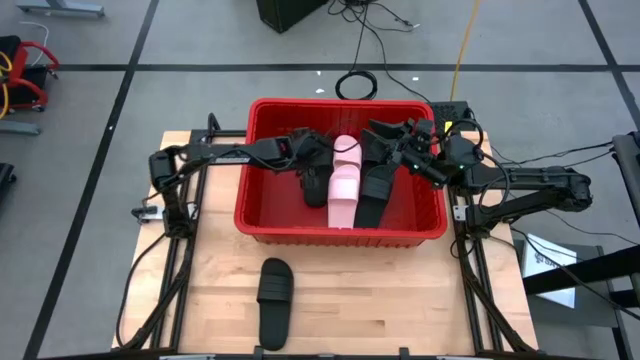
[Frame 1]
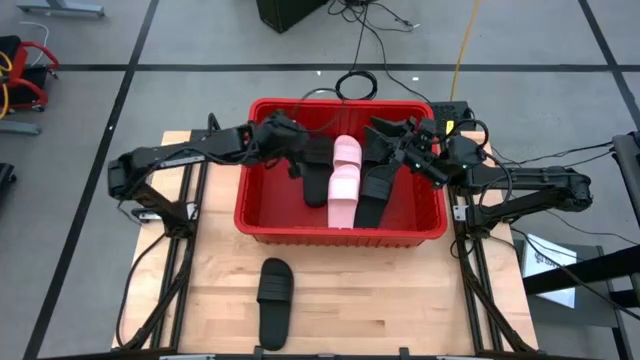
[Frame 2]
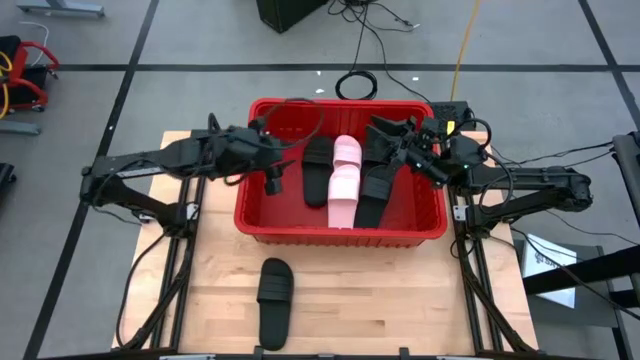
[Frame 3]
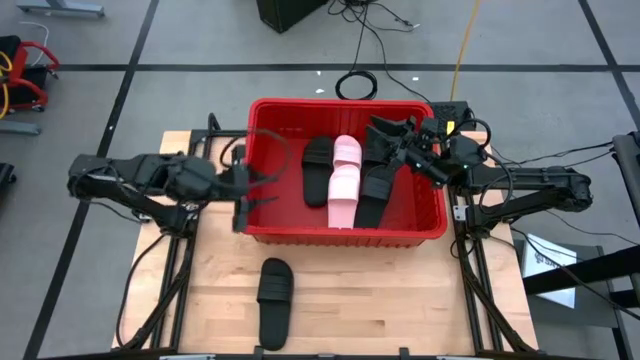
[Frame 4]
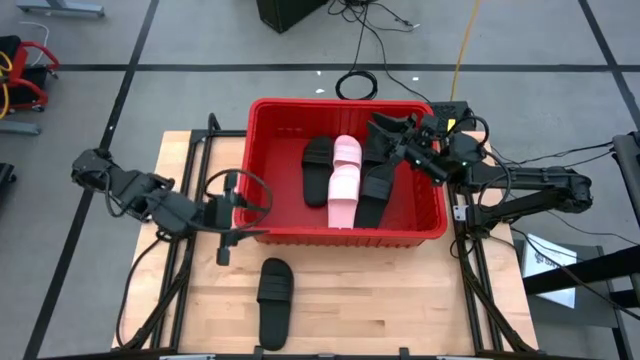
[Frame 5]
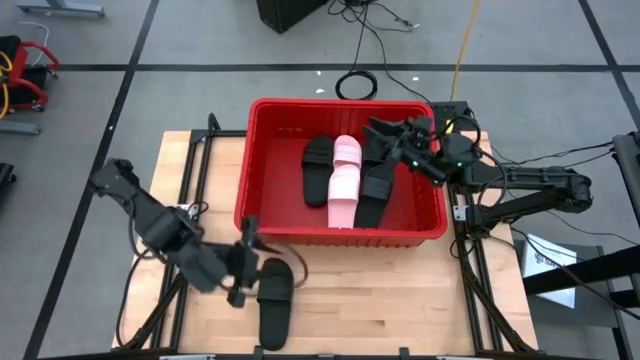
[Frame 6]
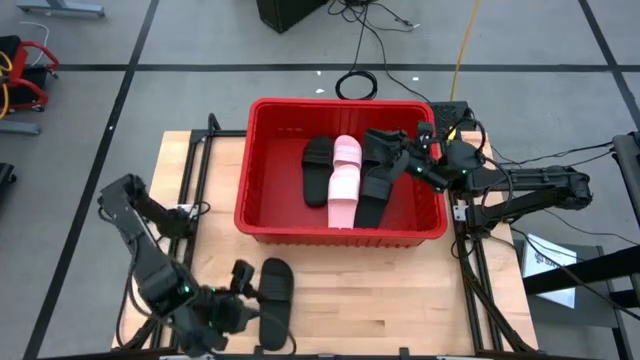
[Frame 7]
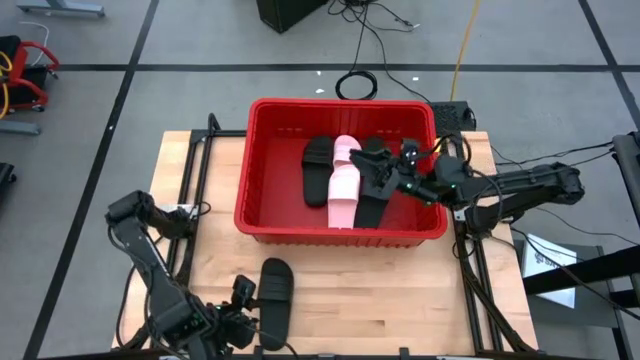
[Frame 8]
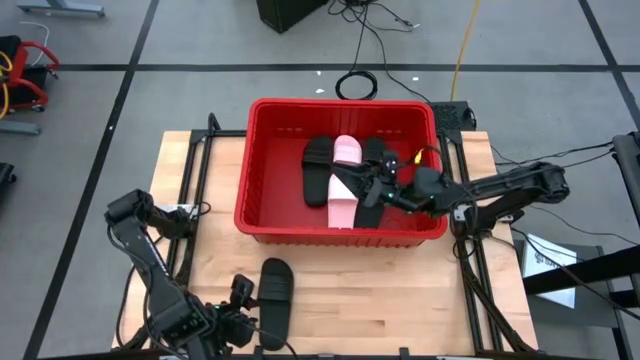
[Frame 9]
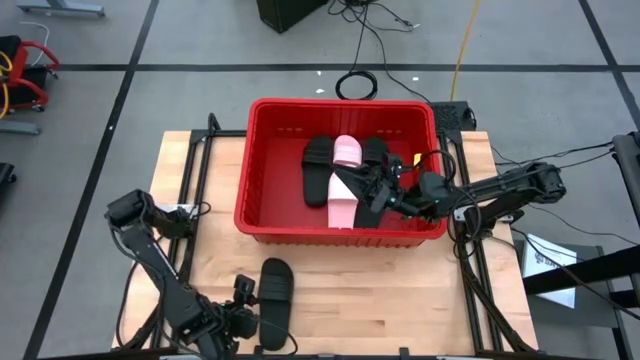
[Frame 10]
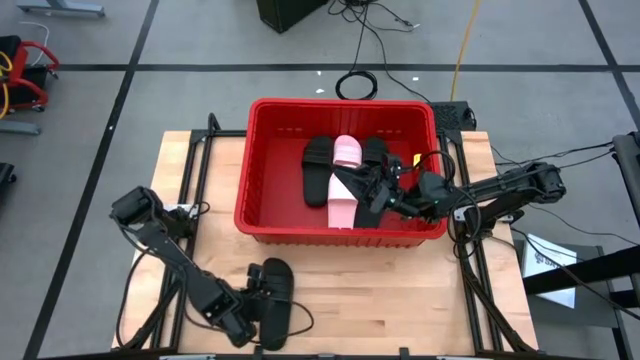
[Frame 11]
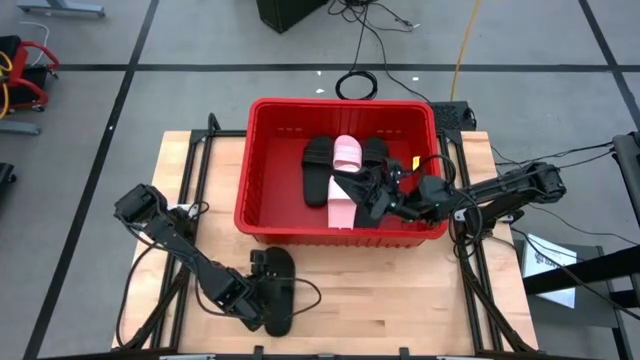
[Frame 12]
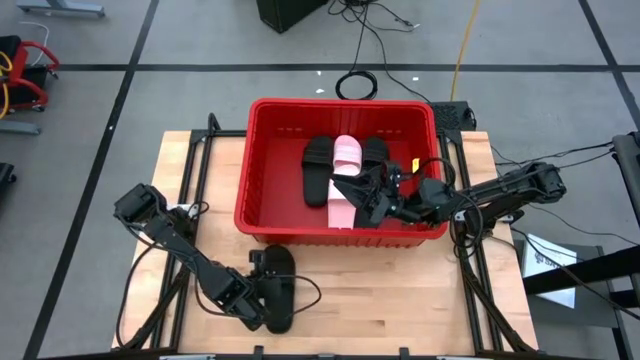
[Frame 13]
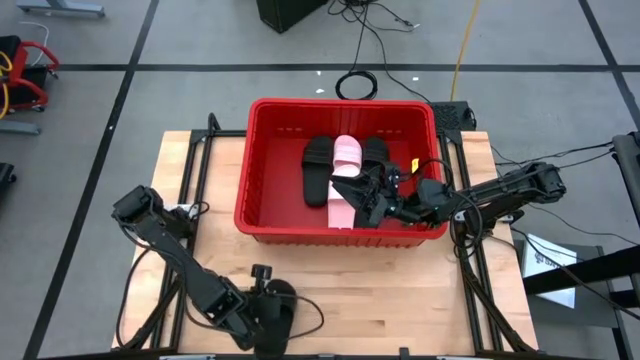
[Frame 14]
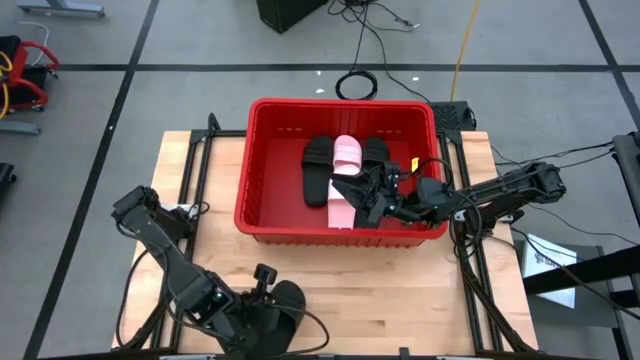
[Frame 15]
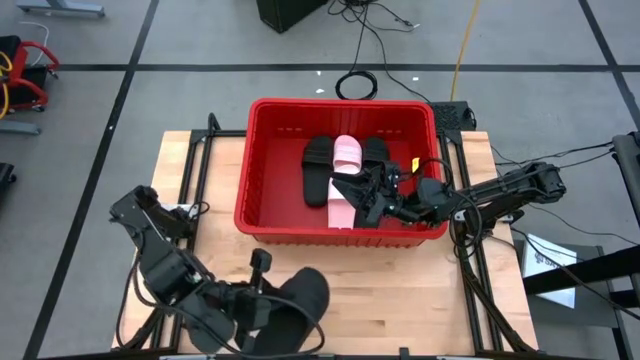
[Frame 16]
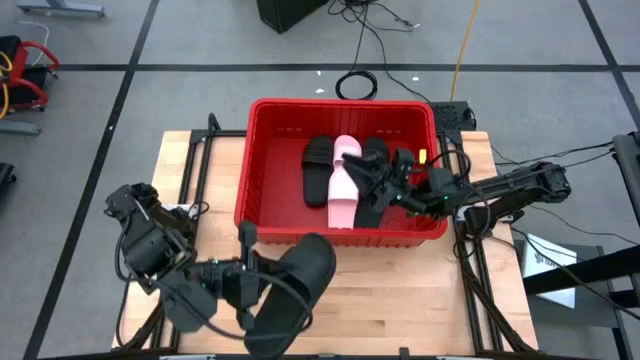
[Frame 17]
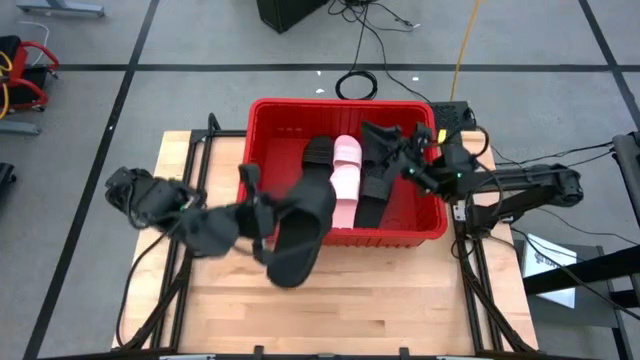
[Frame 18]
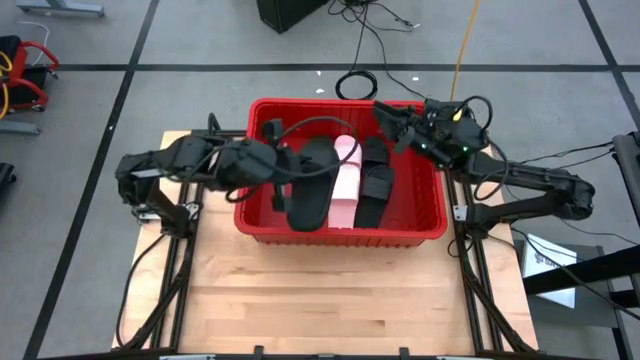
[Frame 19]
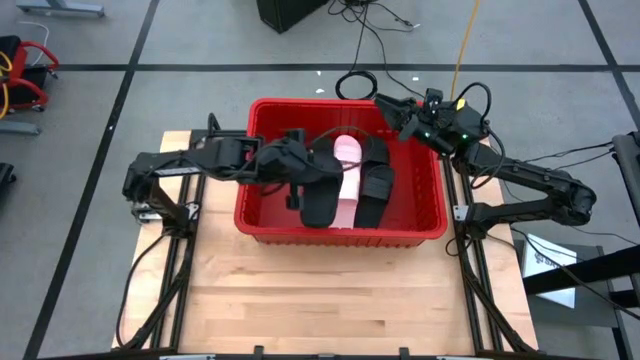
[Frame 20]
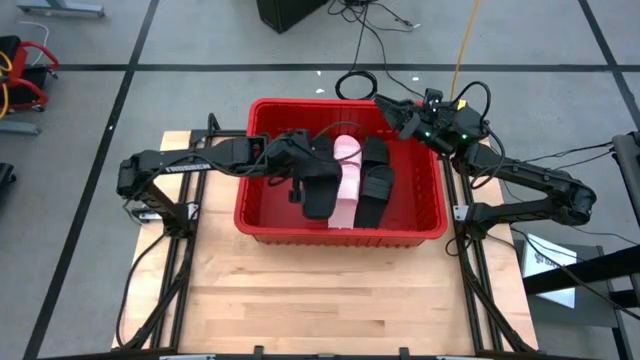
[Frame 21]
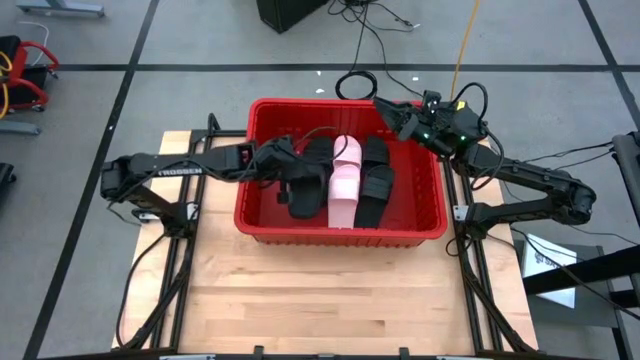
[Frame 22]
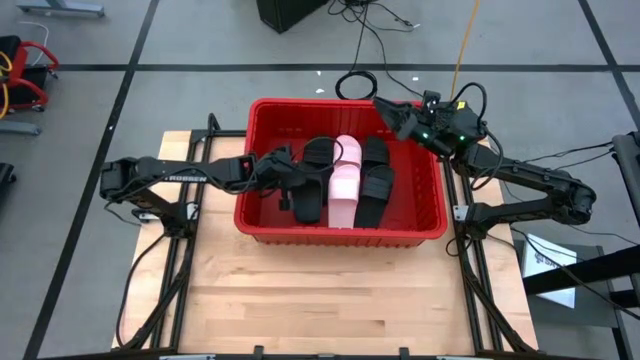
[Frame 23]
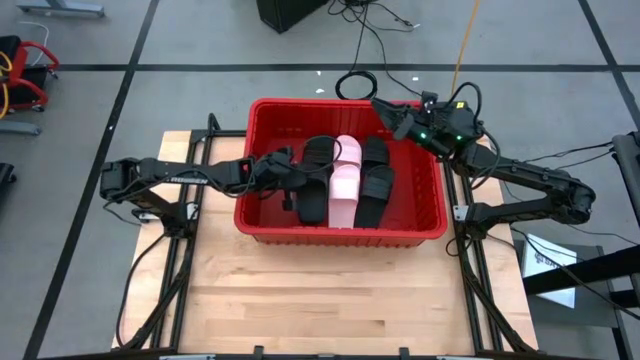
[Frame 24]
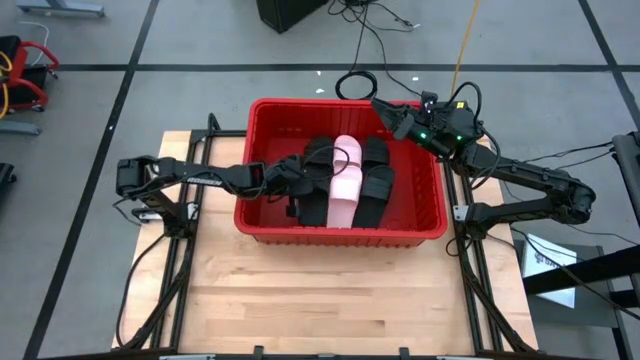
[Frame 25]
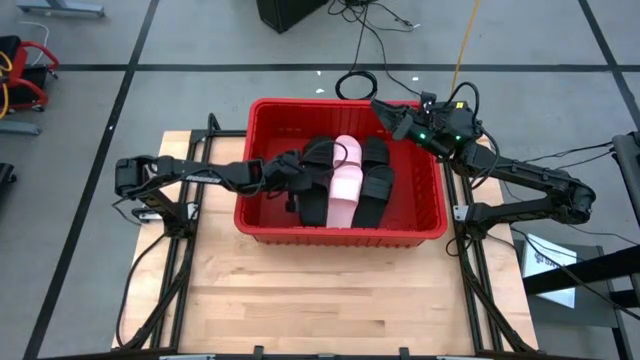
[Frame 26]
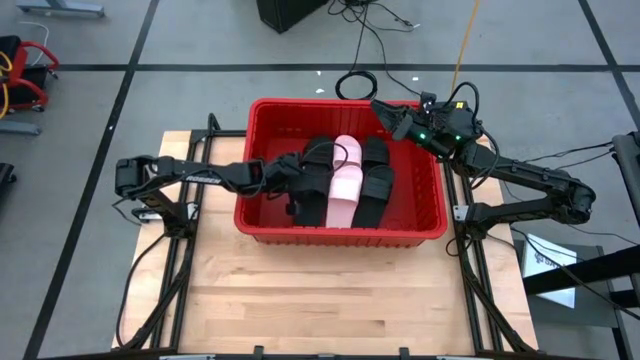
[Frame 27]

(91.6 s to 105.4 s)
Task: Pick and place slides into bin
Put the black slide into the red bin

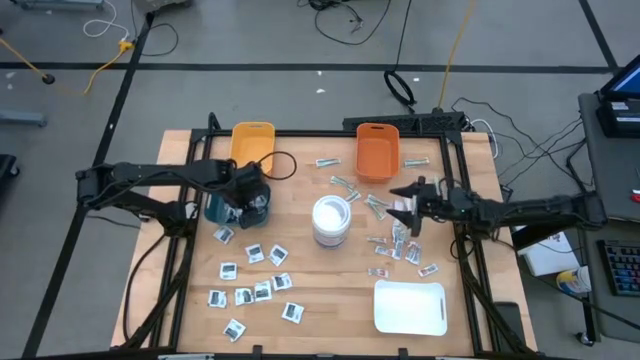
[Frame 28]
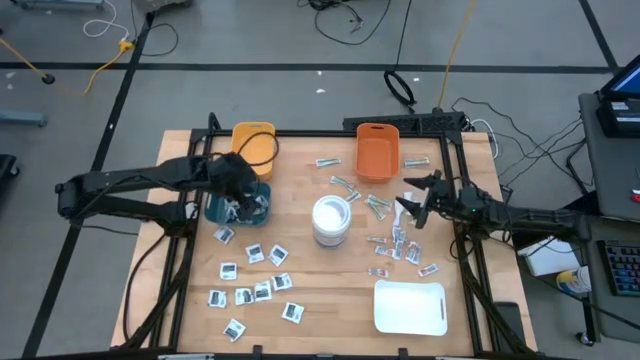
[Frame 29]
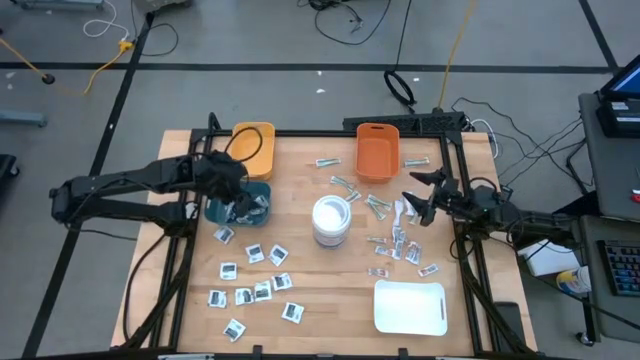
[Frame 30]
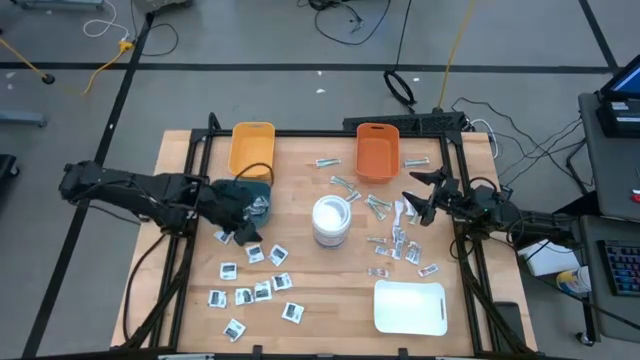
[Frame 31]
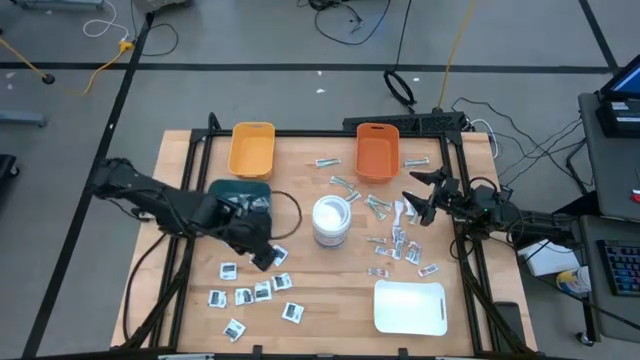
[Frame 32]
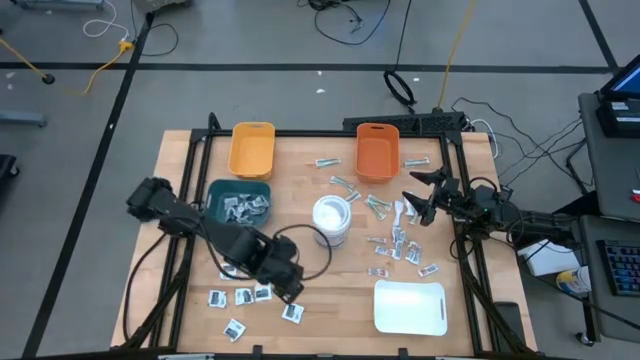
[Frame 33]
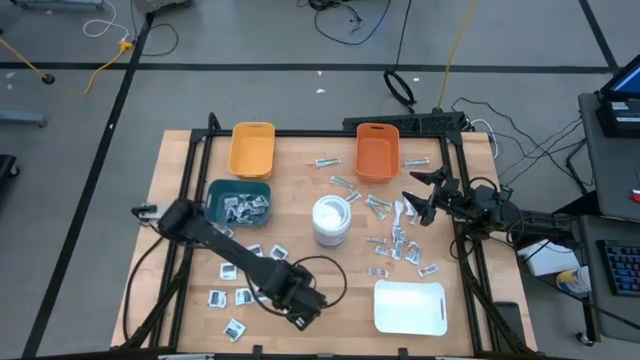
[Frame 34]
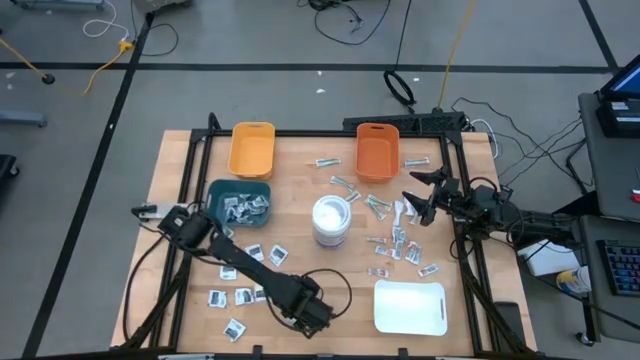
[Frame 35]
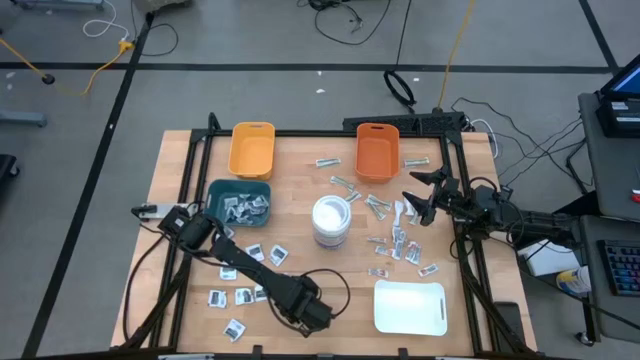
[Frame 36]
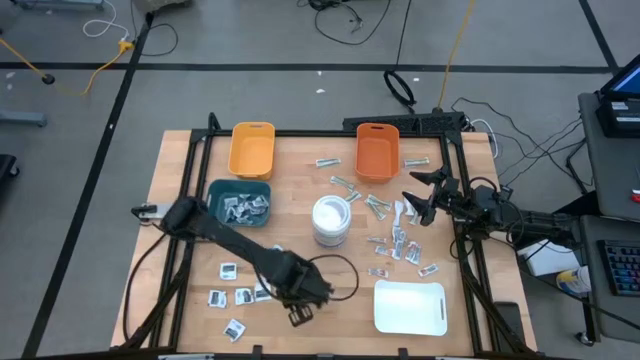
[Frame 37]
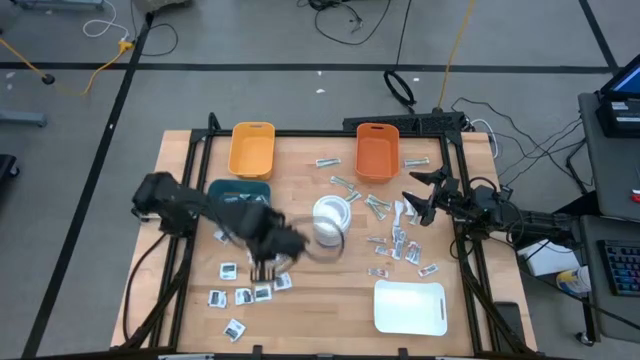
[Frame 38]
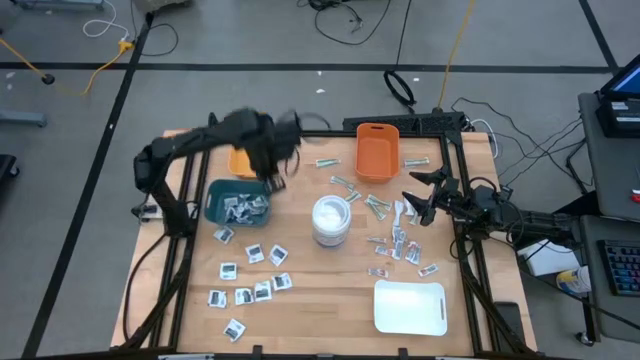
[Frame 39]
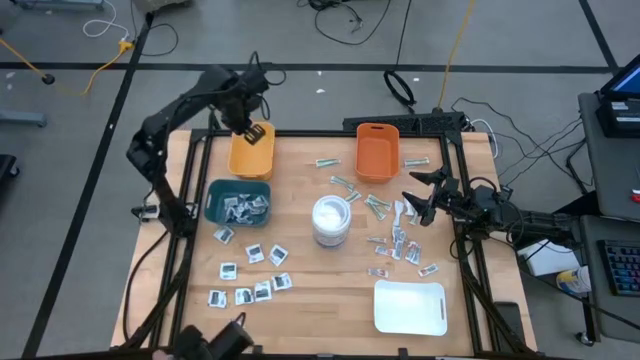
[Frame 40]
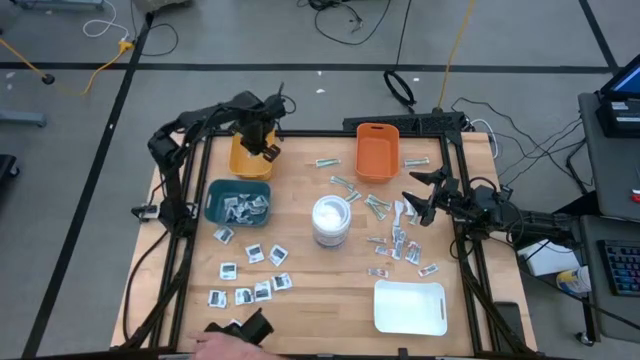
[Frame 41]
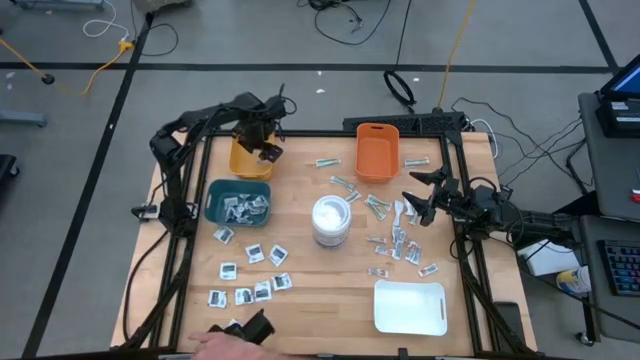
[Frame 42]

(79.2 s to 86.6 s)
Task: Pick & Place First Aid Supplies
Put the black pad into the yellow bin
